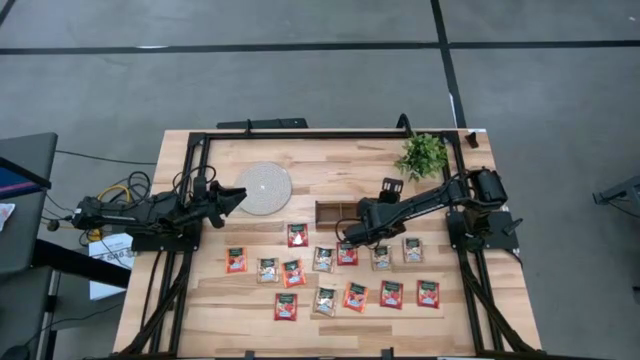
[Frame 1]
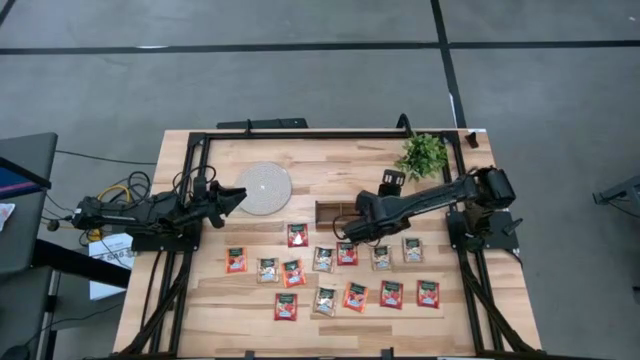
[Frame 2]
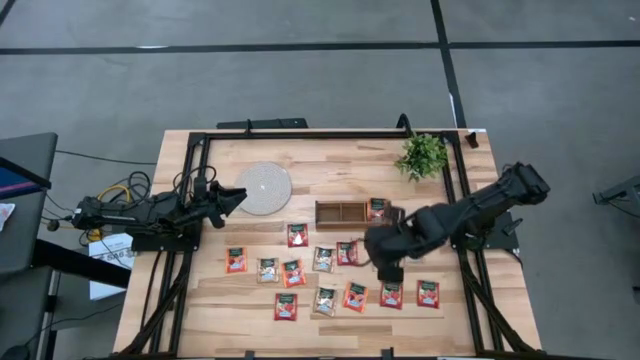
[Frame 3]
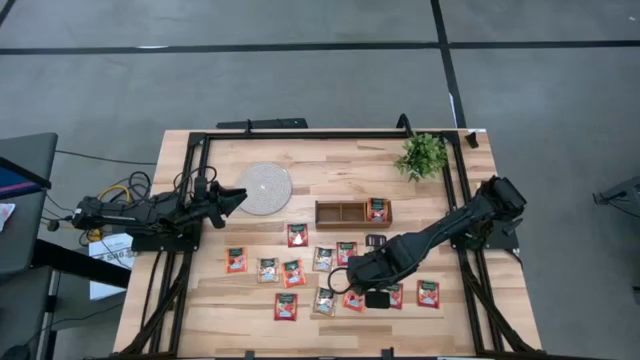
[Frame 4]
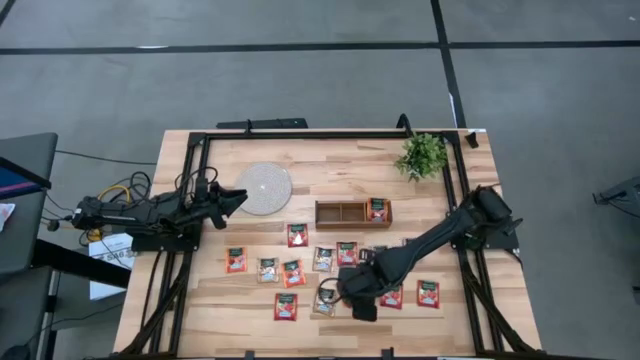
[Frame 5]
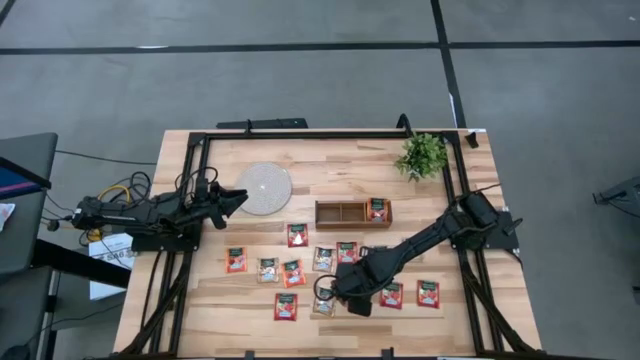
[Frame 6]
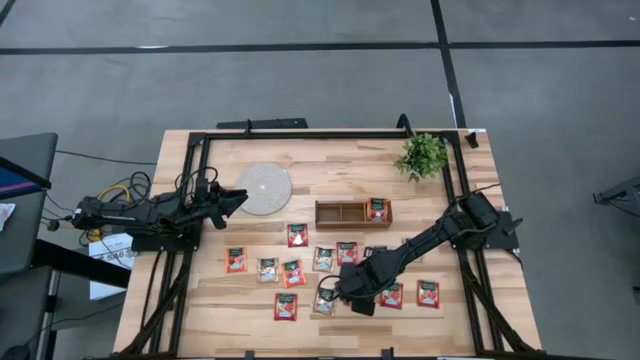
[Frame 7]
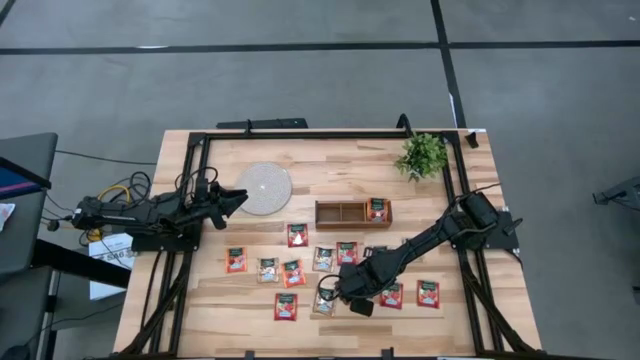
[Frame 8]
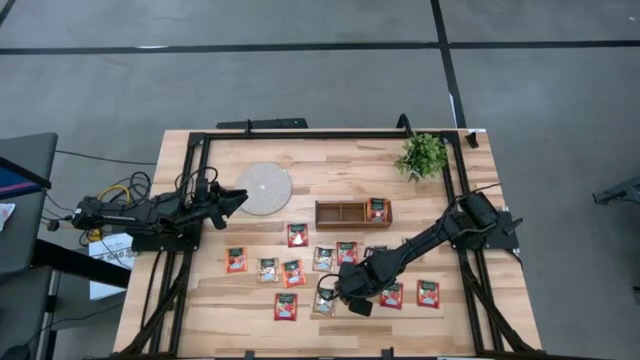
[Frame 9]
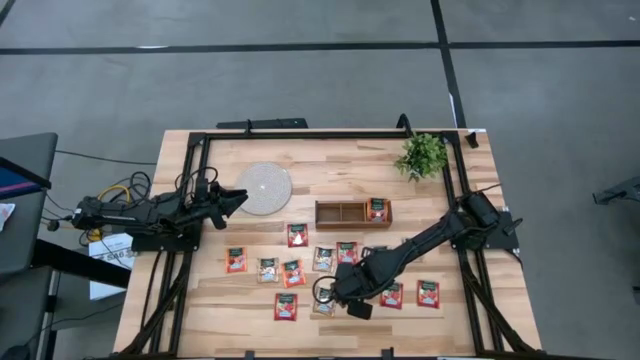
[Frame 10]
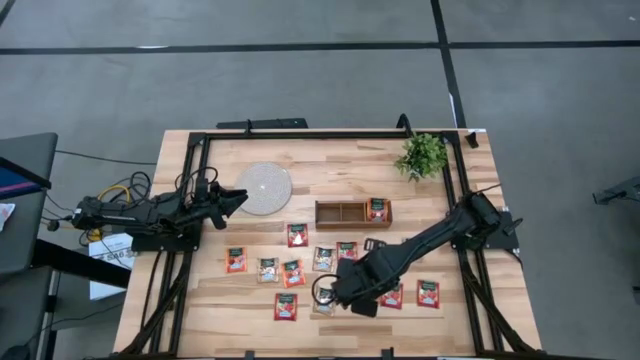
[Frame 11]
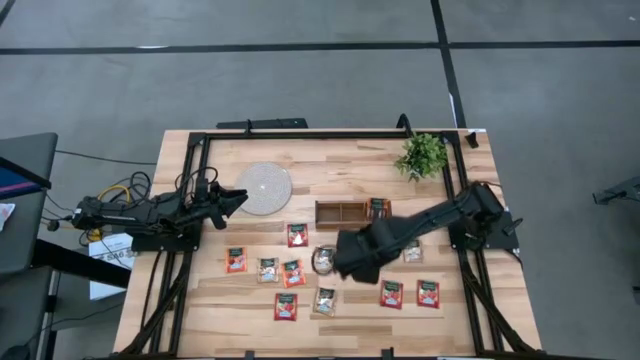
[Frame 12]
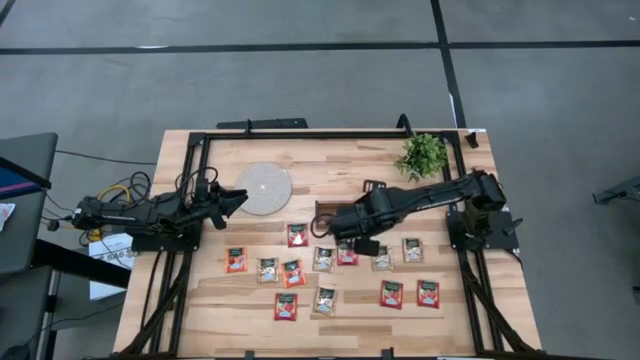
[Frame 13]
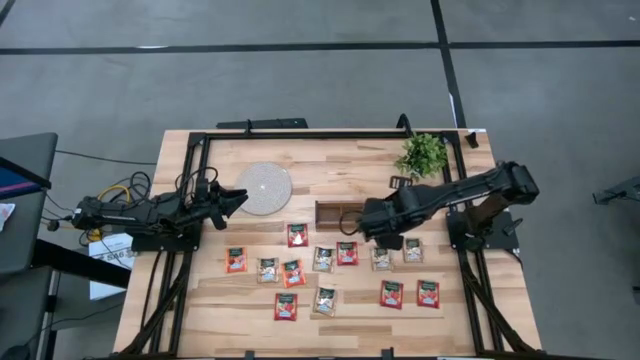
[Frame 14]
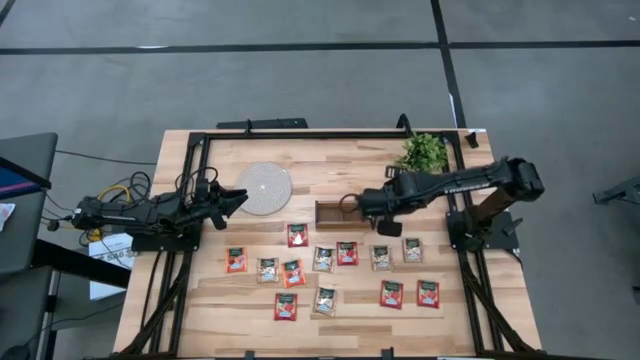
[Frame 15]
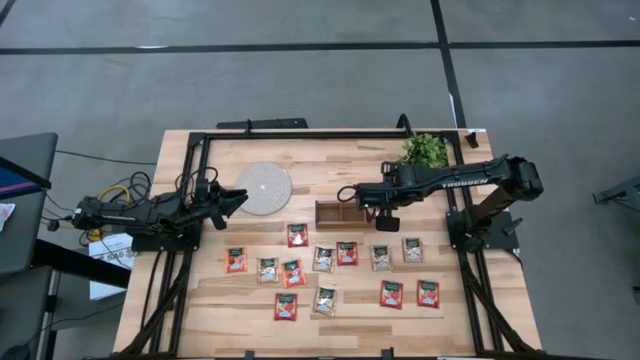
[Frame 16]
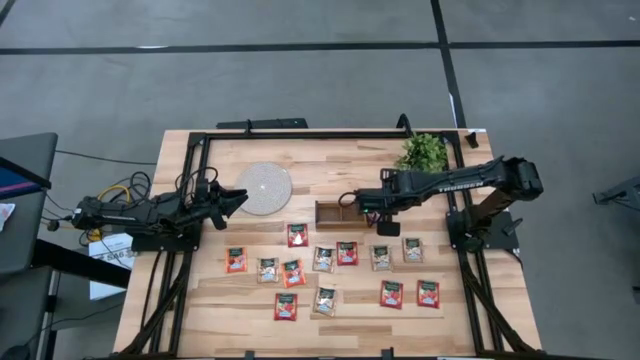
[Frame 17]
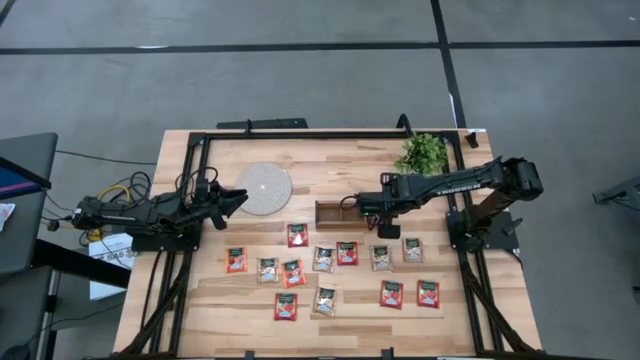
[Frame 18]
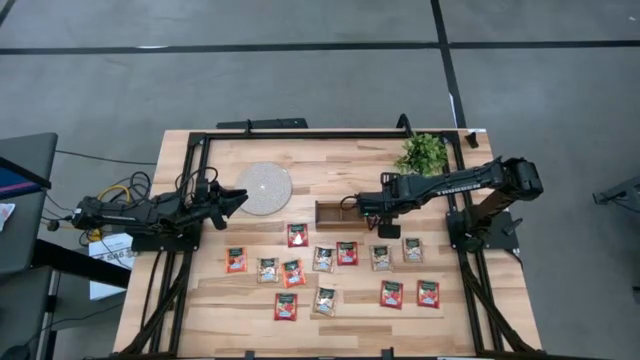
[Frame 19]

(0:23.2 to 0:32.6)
Task: Pick & Place Tea
Put the orange tea bag into the right section of the wooden organizer

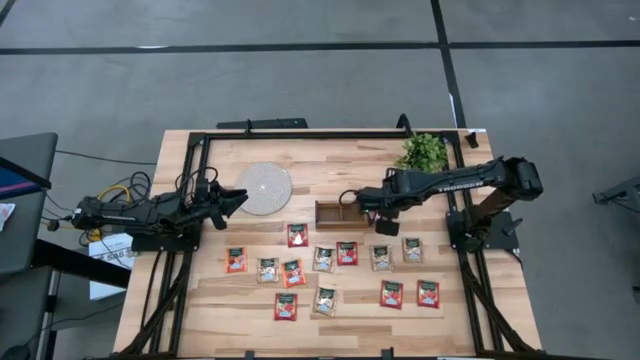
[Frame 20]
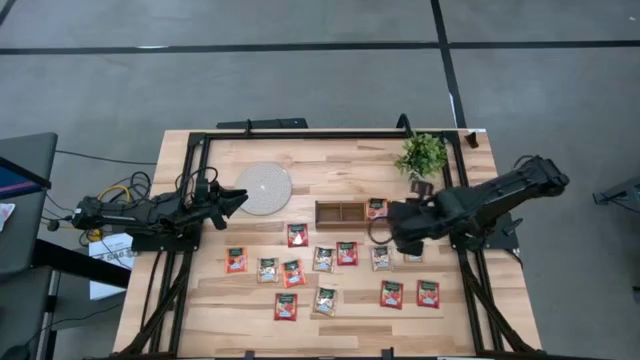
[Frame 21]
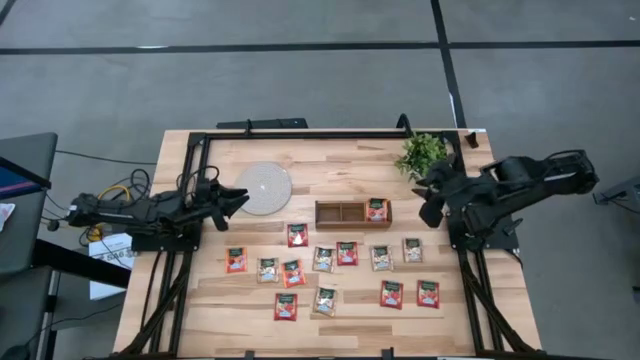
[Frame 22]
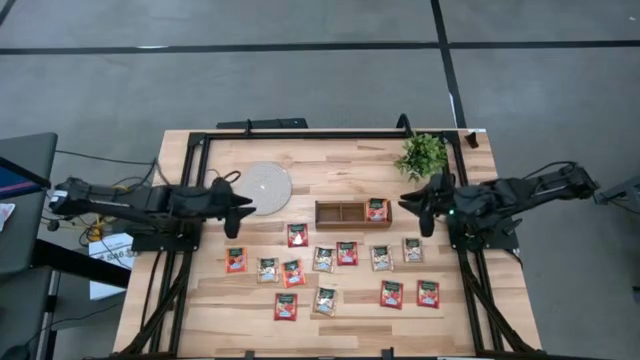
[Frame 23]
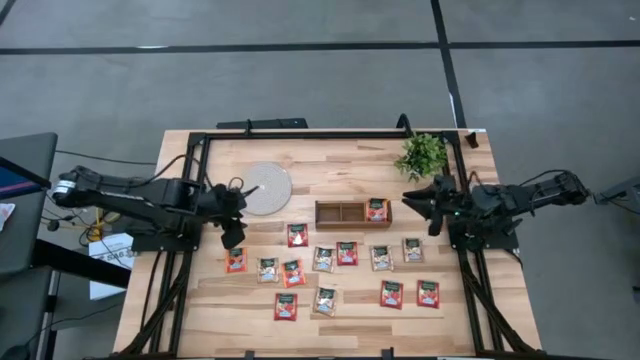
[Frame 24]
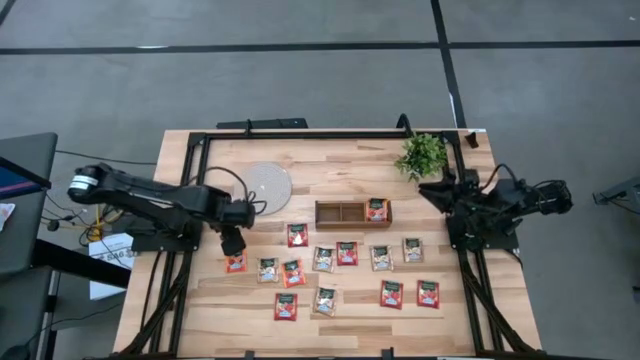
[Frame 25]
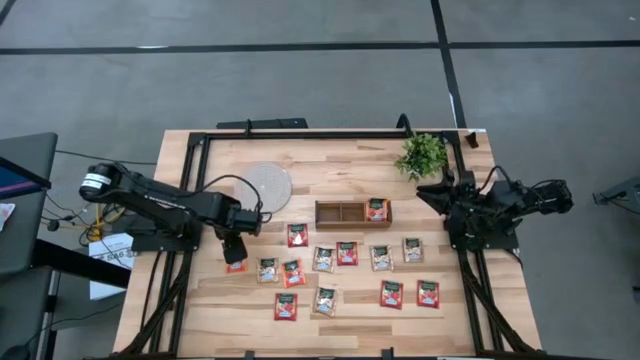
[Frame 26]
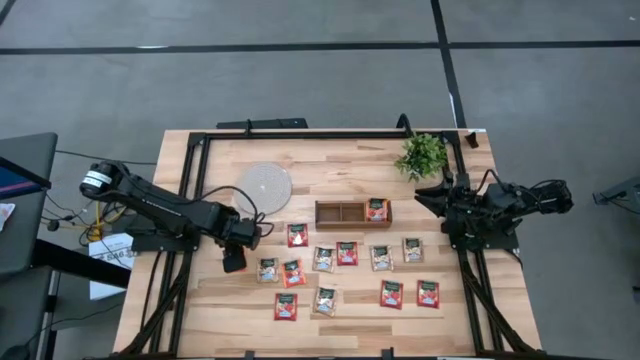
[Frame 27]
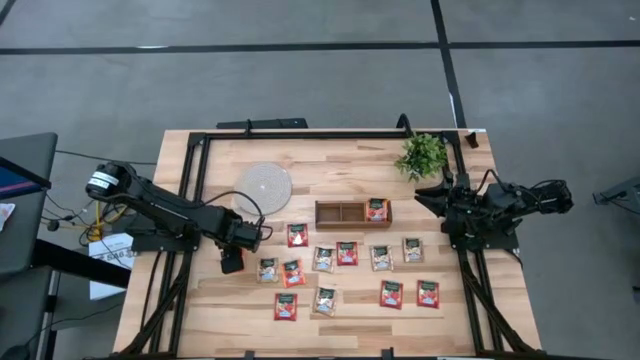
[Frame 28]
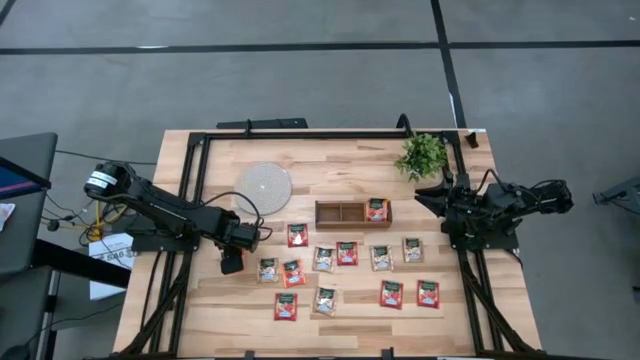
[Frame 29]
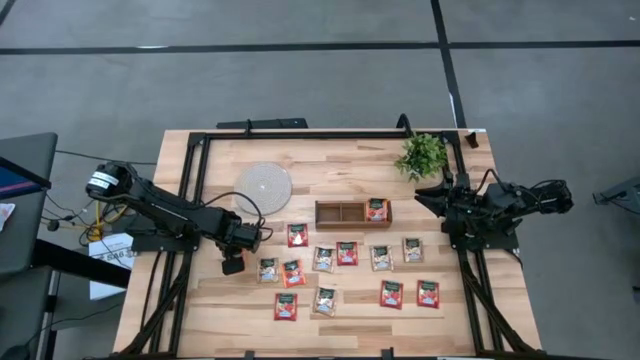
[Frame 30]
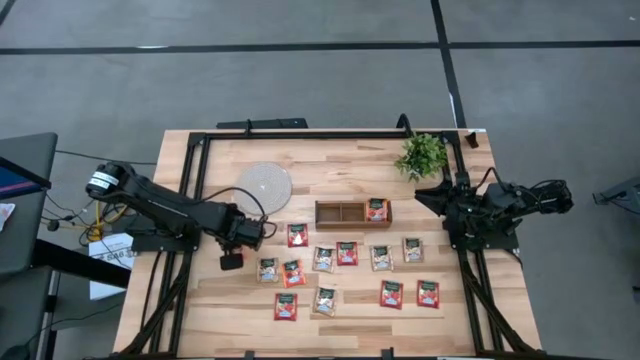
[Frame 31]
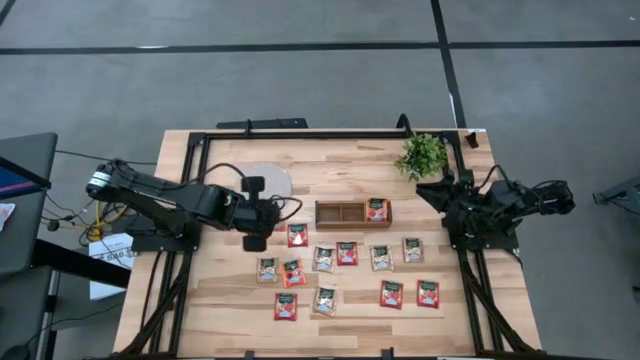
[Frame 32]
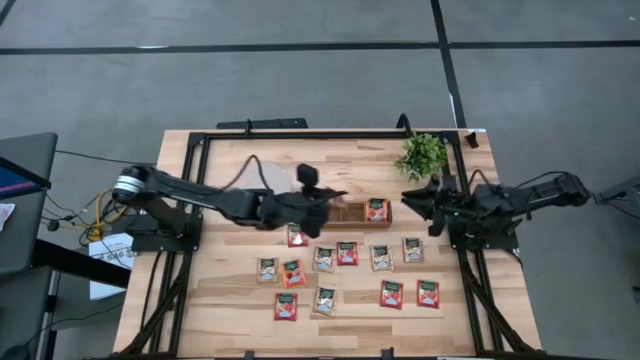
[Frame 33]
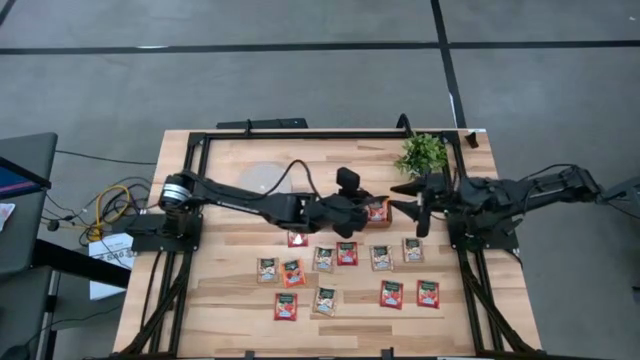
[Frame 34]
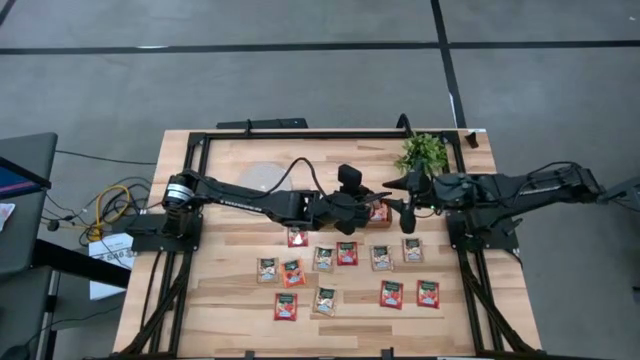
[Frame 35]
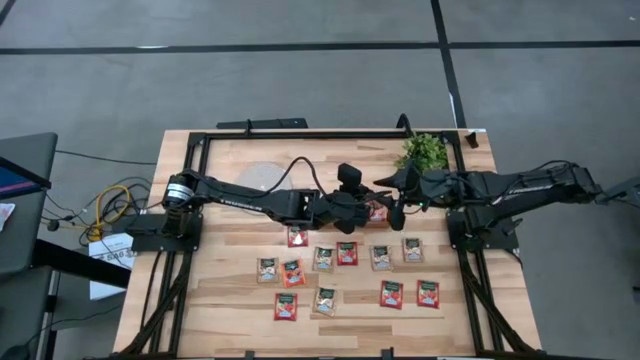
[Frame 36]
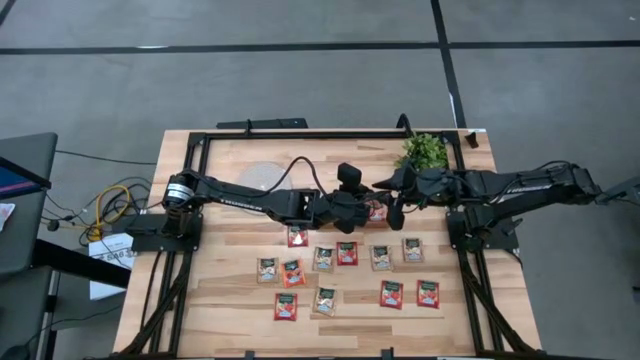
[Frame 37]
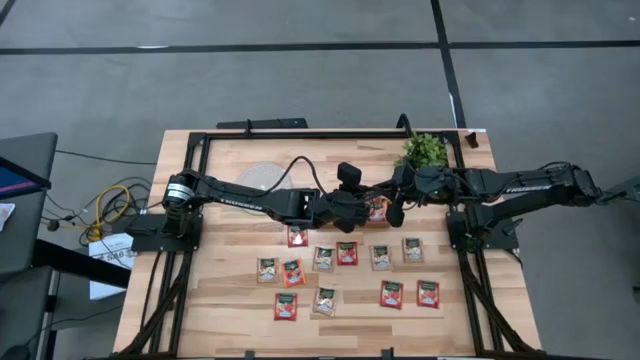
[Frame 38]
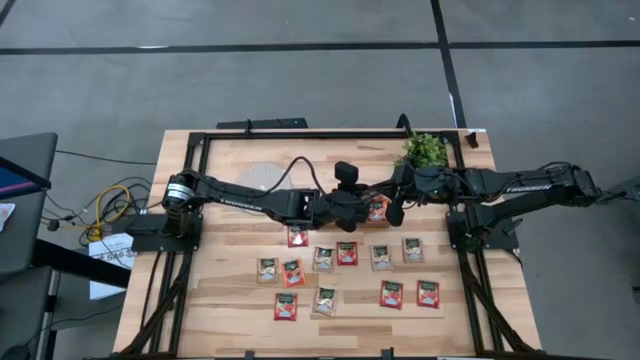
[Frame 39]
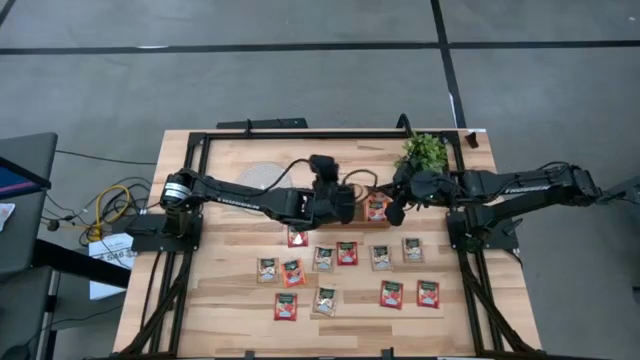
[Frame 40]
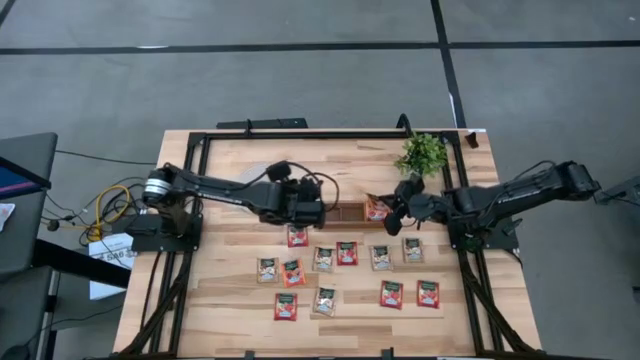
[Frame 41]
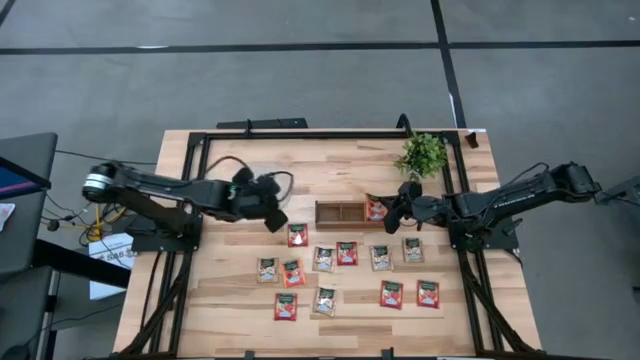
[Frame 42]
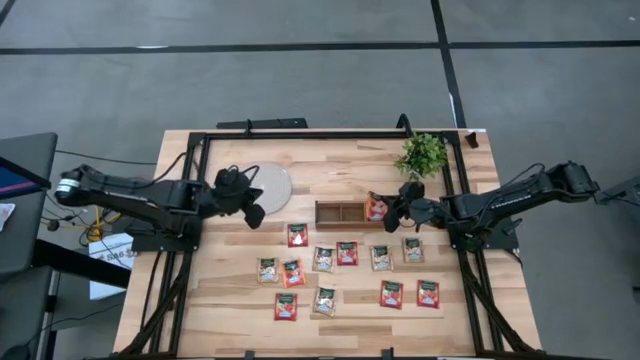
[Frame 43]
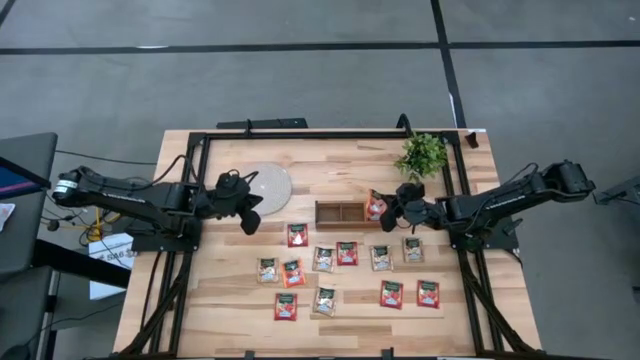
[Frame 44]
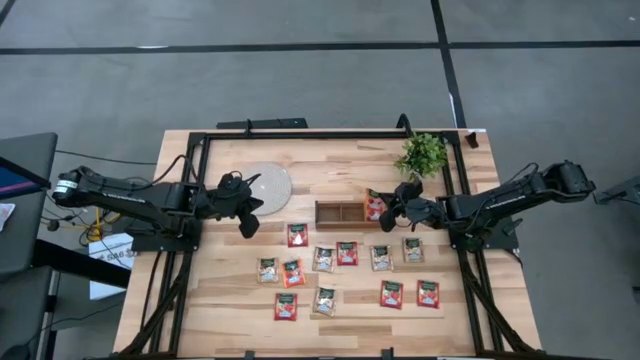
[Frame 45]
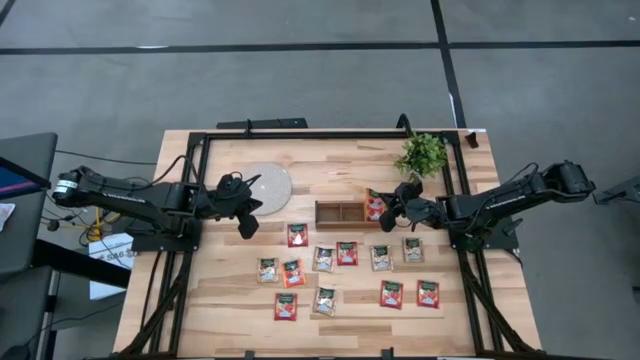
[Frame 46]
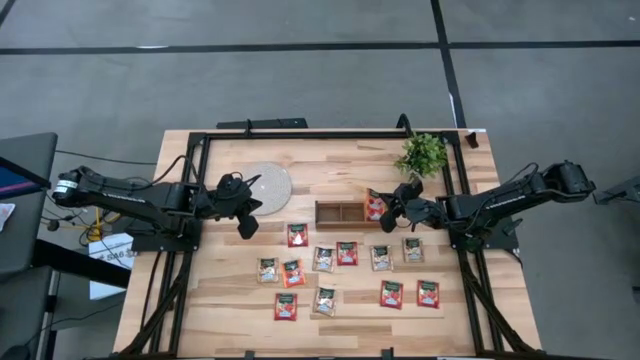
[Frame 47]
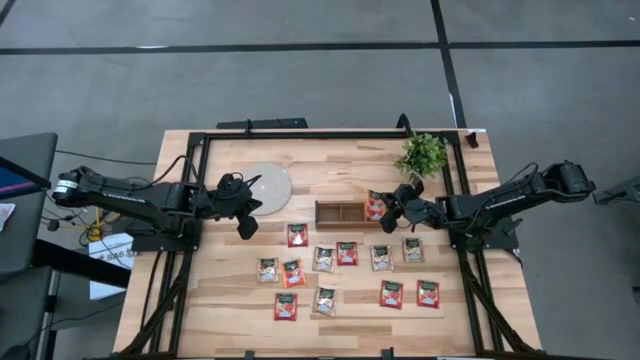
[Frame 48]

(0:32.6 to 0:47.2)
Put the orange tea bag into the right section of the wooden organizer
